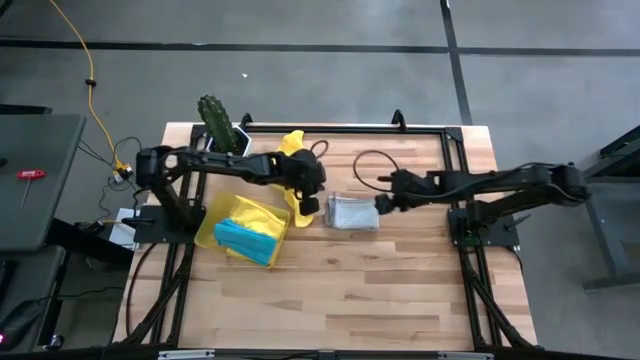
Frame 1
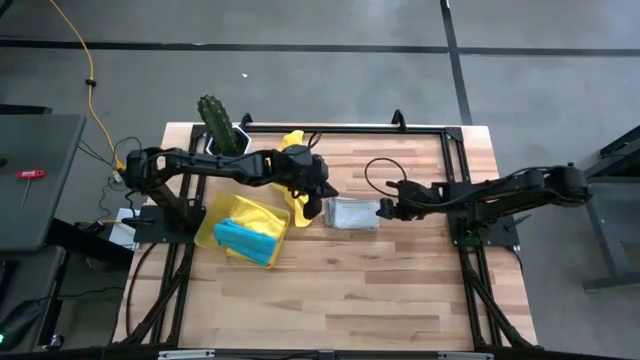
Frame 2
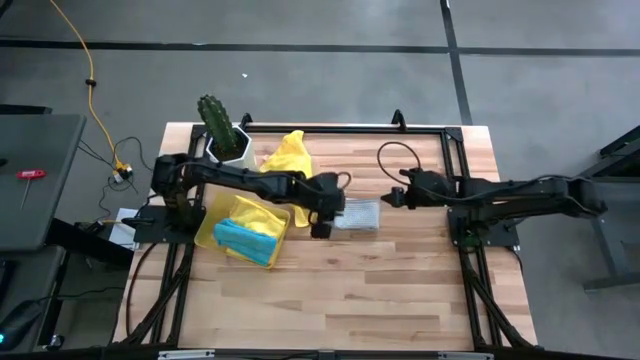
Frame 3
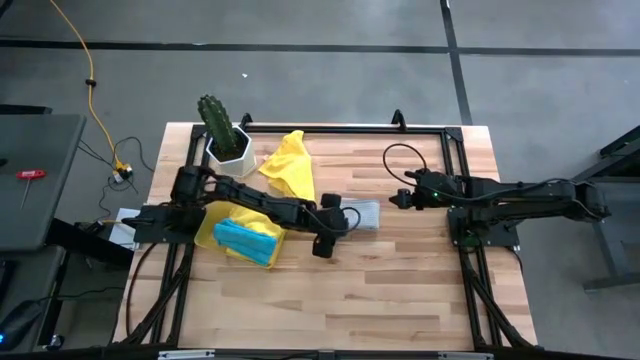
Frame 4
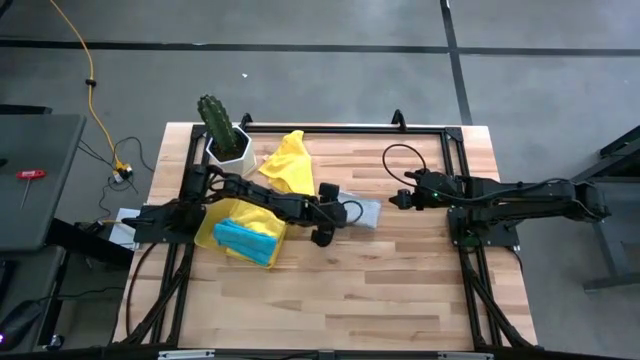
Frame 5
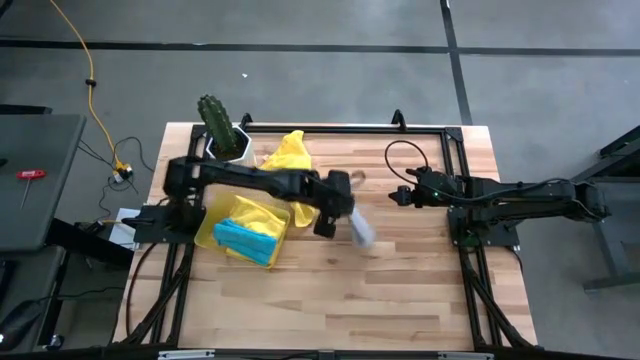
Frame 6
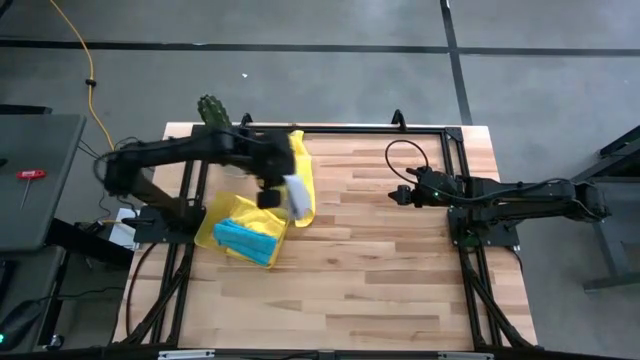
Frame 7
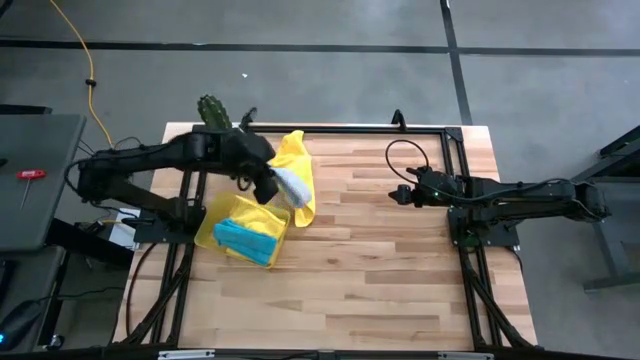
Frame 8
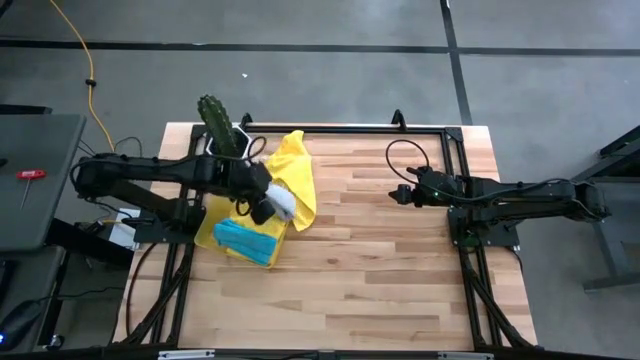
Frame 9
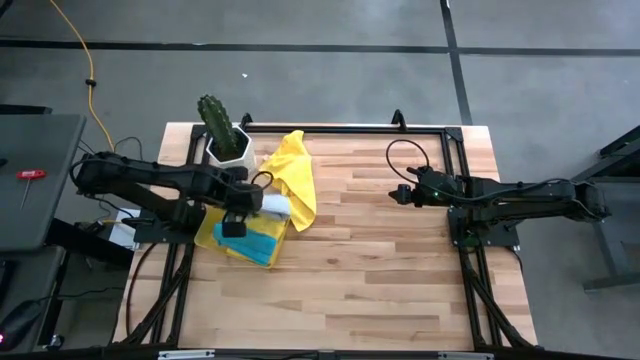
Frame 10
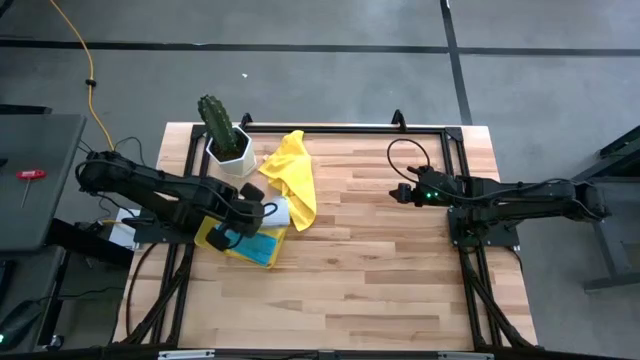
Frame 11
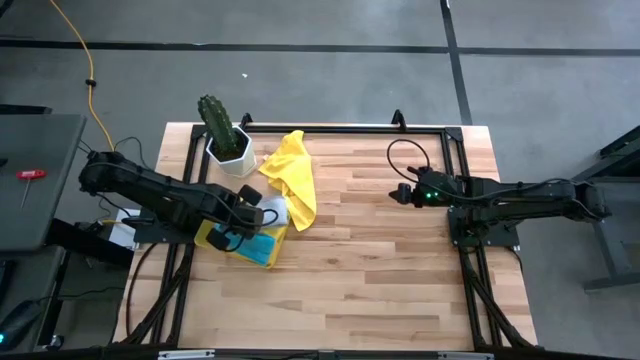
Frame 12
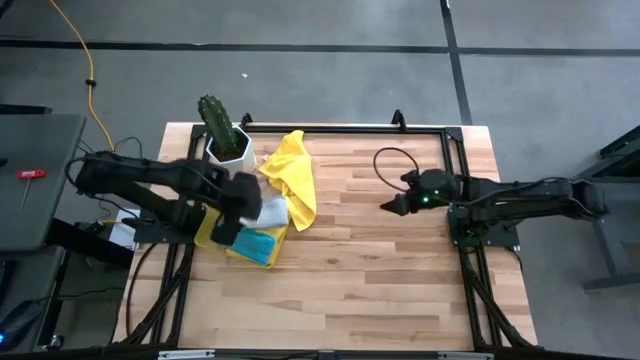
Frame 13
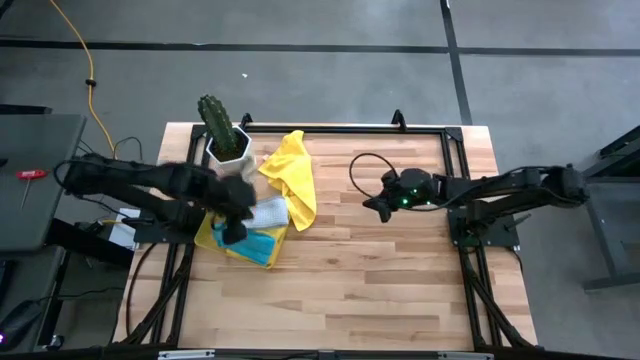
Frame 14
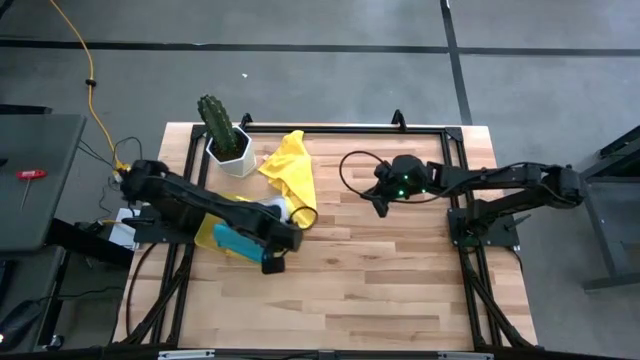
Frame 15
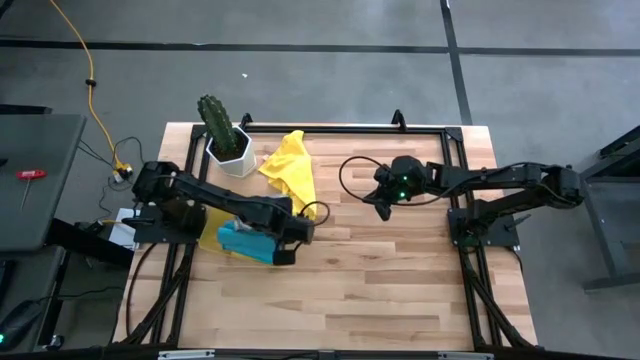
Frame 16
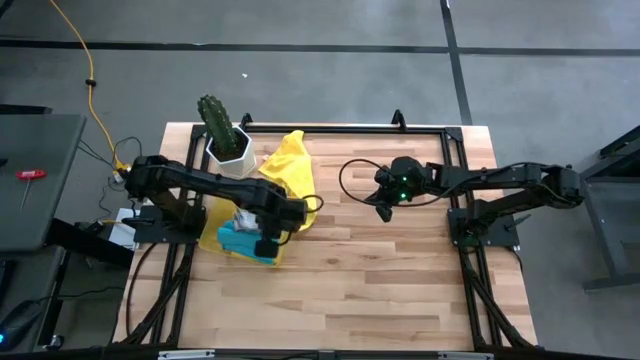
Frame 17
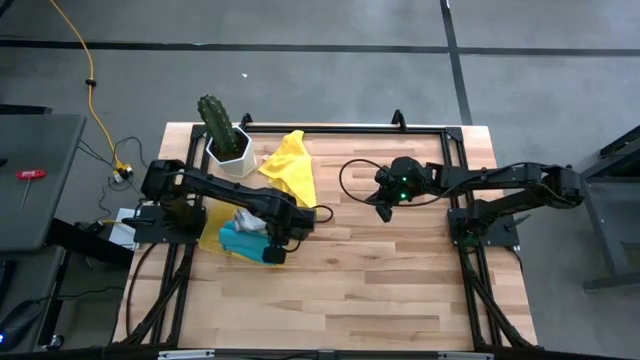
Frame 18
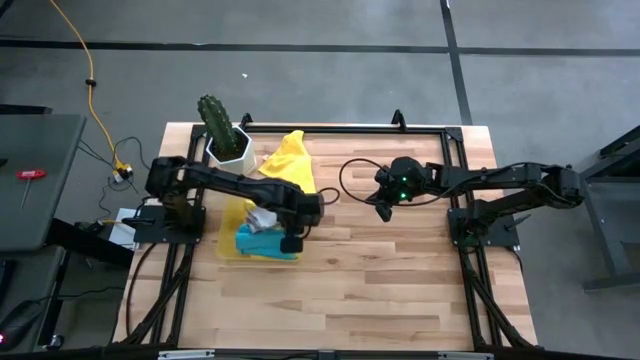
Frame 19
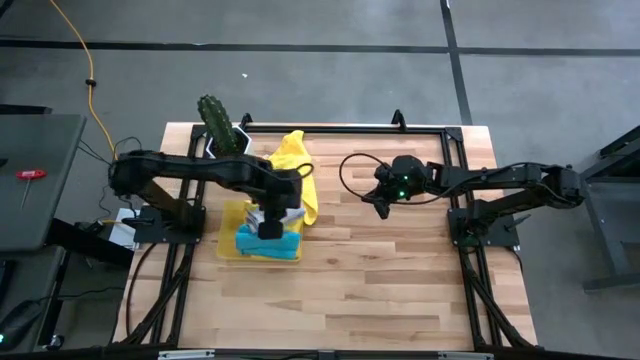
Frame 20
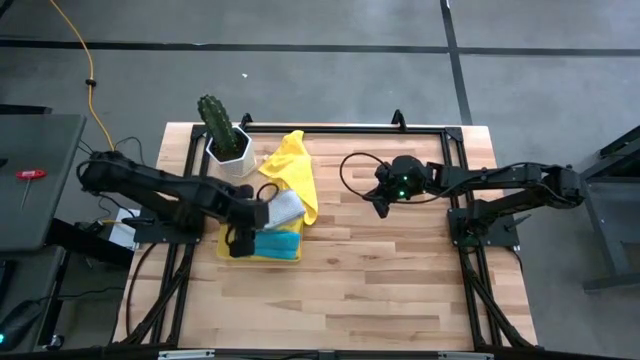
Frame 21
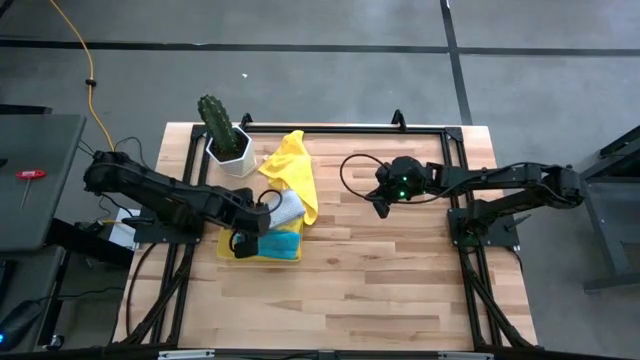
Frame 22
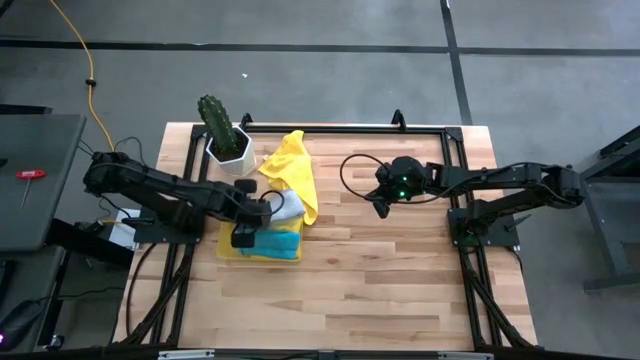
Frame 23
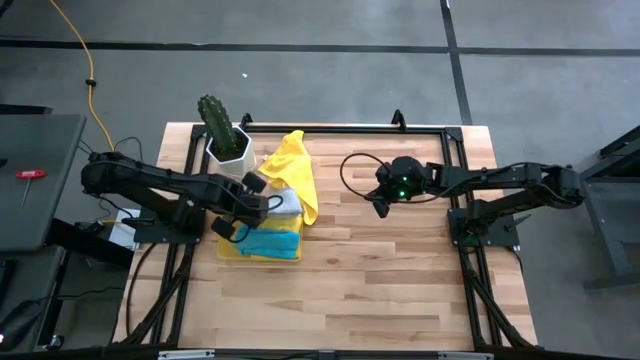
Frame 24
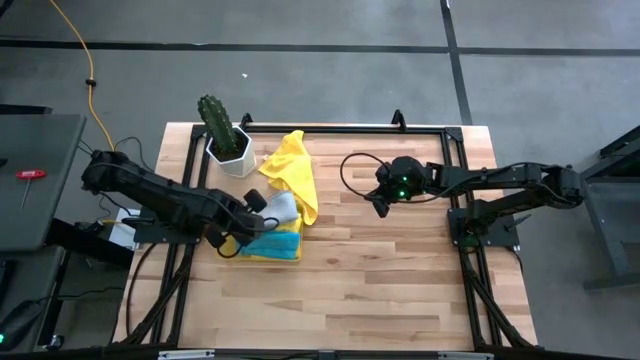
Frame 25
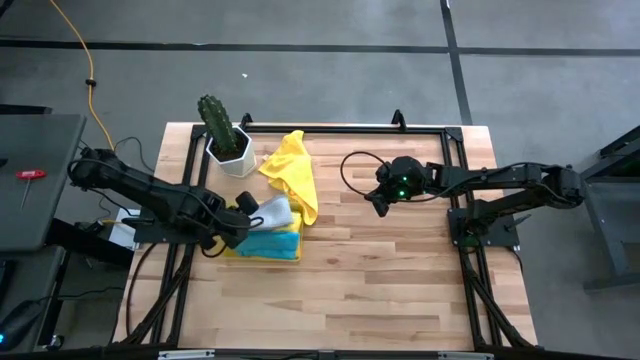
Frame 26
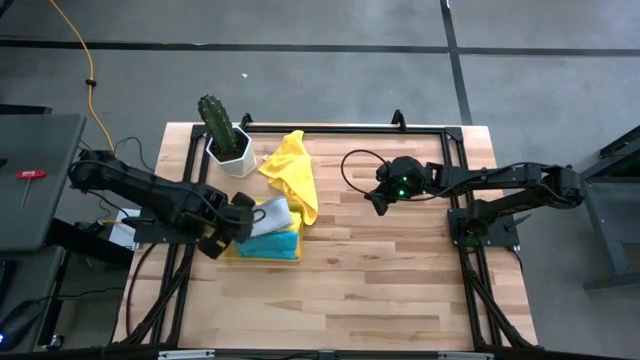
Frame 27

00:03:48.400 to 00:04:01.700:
Task: Fold microfiber towels
Put the gray microfiber towel into the yellow bin

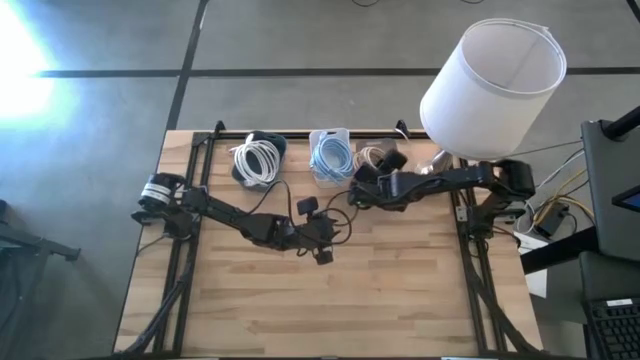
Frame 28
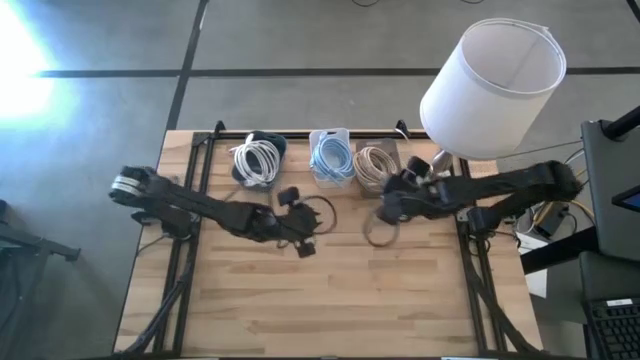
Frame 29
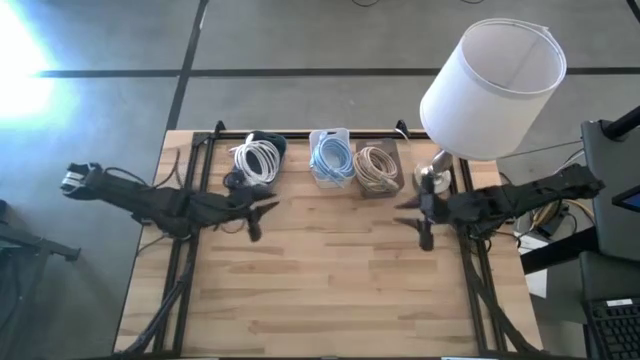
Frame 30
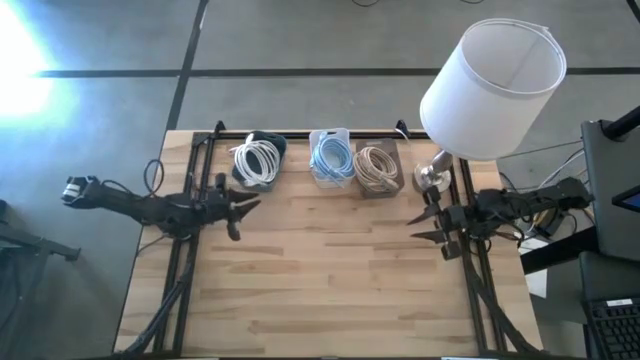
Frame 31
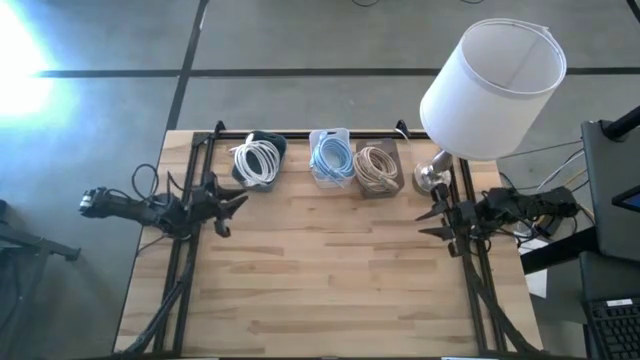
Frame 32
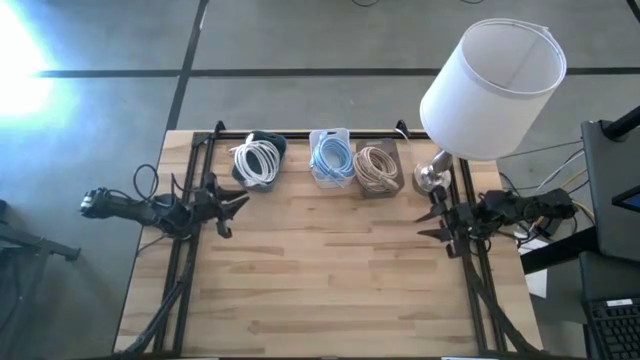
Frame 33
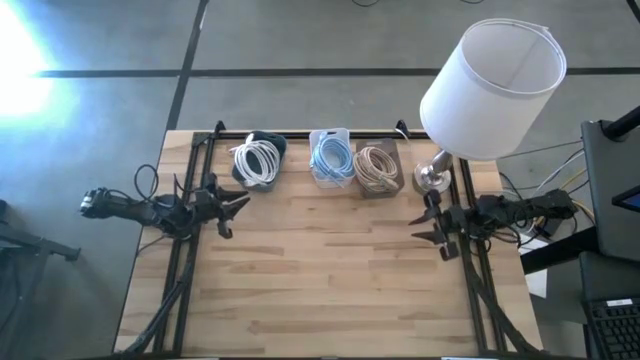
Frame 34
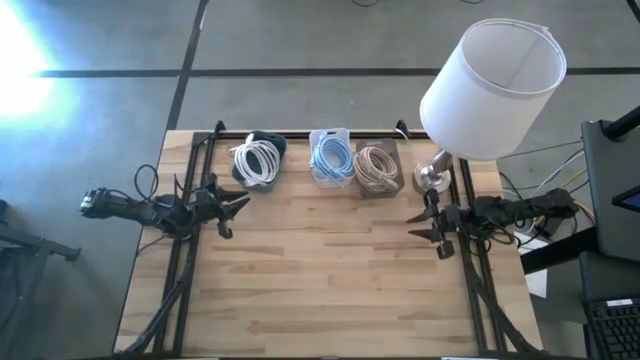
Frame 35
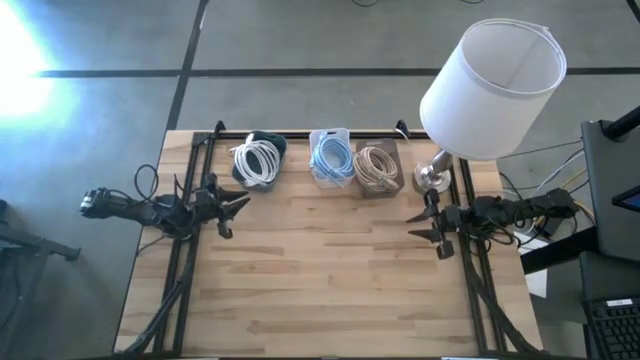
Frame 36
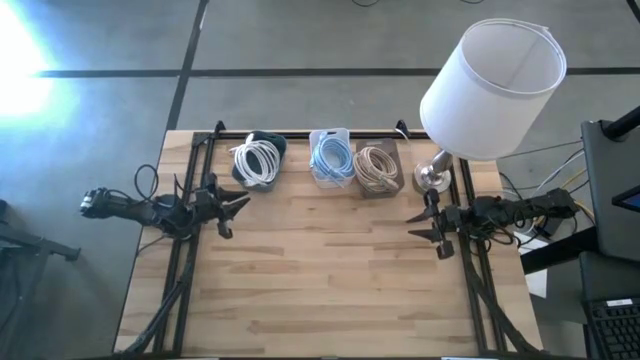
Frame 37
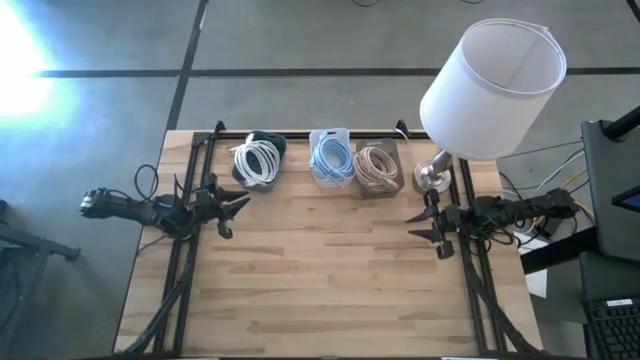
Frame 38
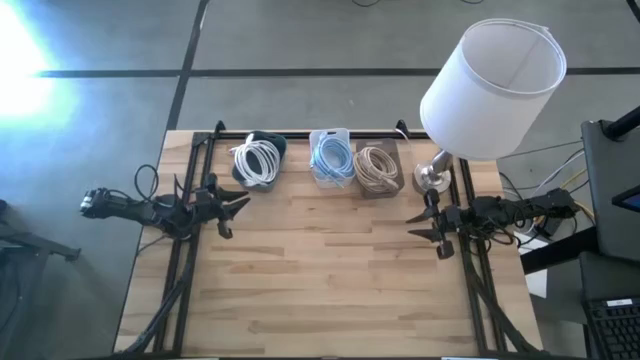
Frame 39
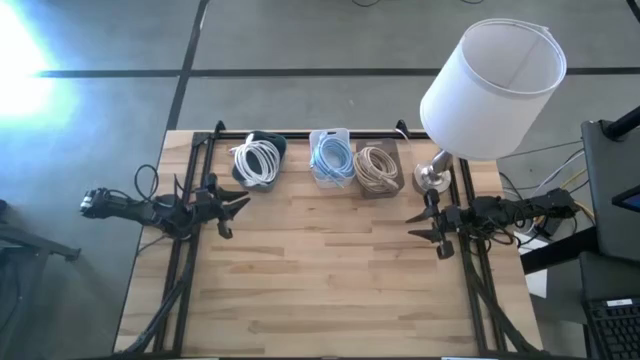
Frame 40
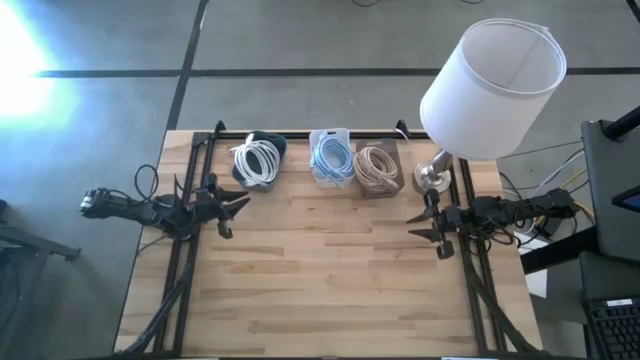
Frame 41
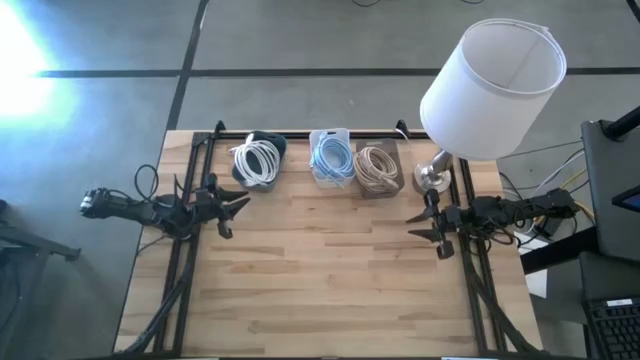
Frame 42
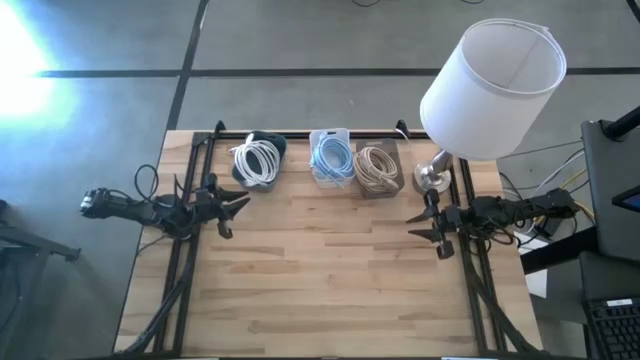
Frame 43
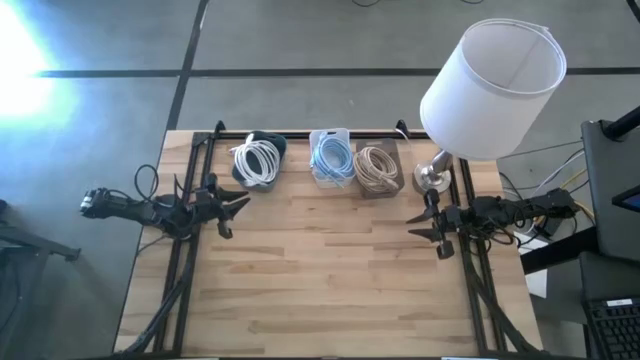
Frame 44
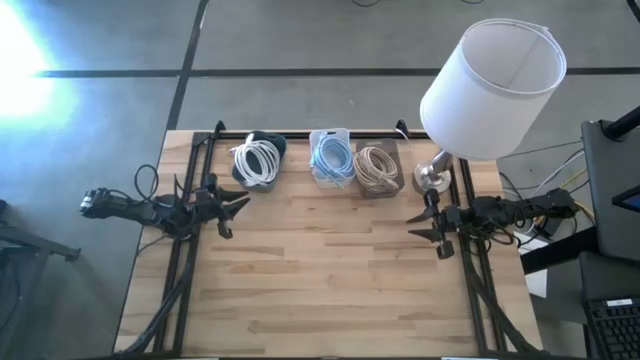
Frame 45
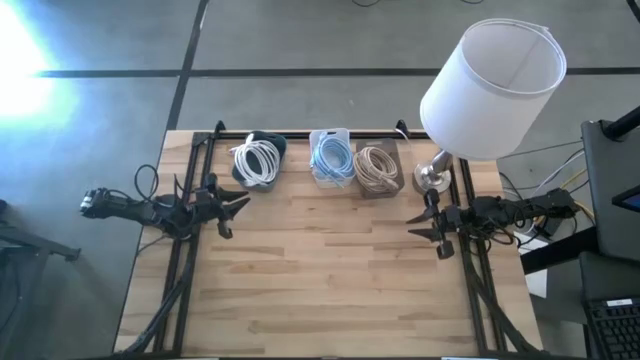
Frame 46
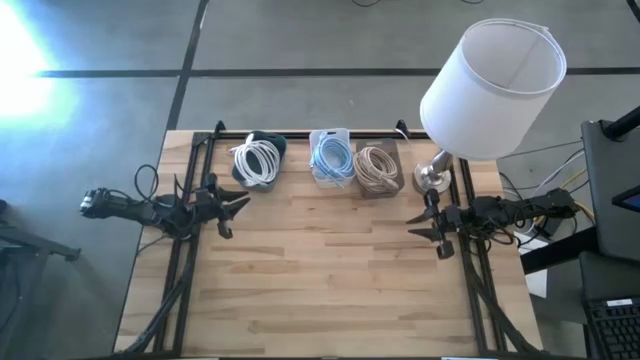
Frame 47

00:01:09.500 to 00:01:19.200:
Task: Sort HDMI cables
Return to Home Position
